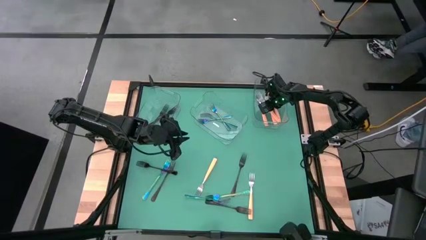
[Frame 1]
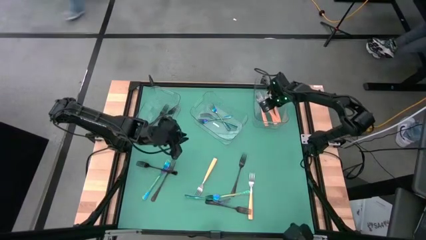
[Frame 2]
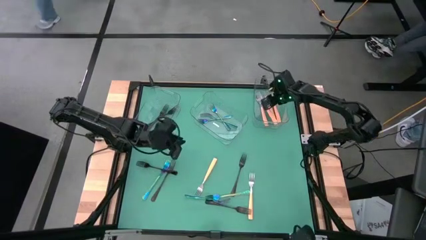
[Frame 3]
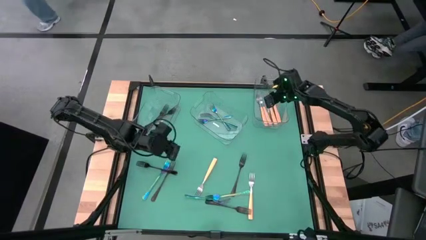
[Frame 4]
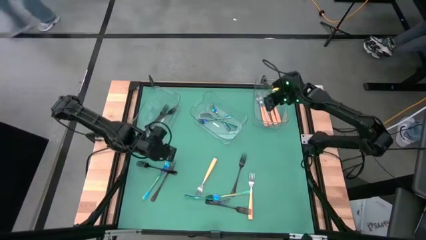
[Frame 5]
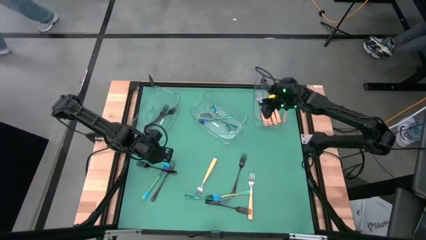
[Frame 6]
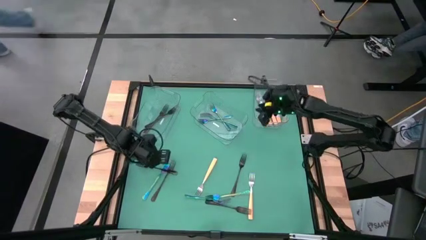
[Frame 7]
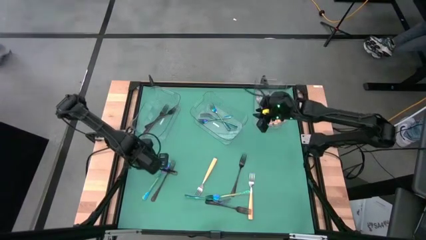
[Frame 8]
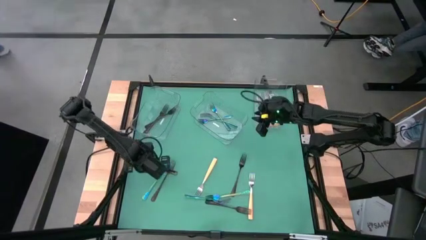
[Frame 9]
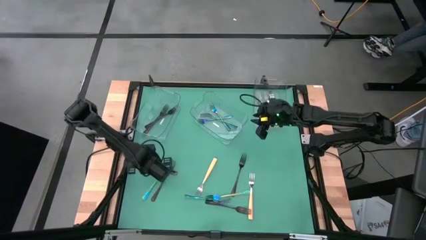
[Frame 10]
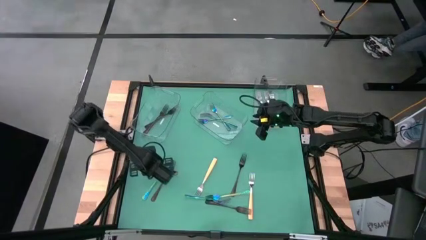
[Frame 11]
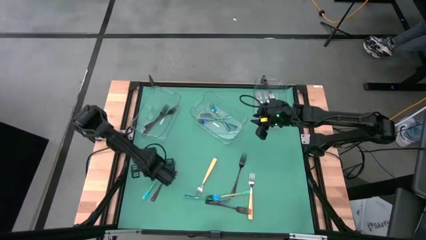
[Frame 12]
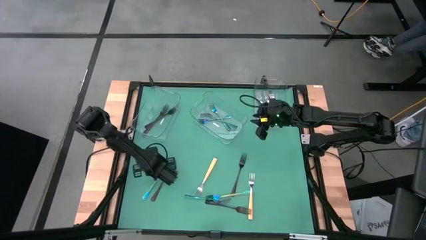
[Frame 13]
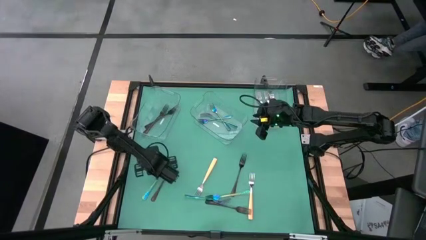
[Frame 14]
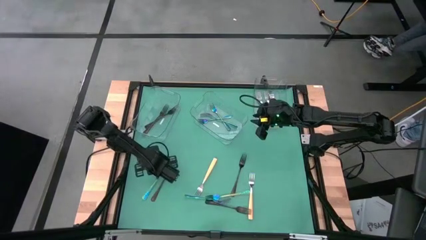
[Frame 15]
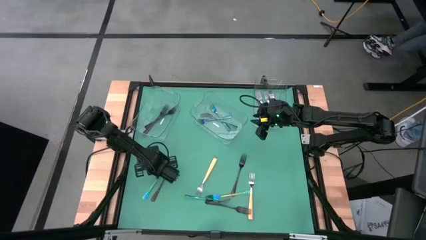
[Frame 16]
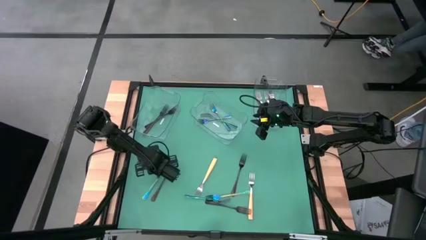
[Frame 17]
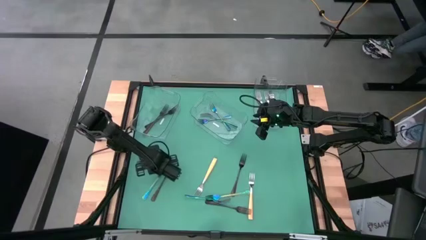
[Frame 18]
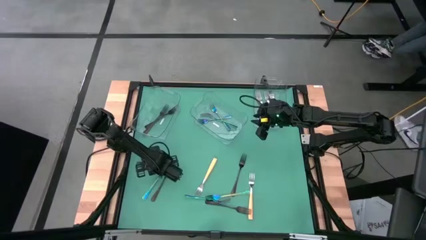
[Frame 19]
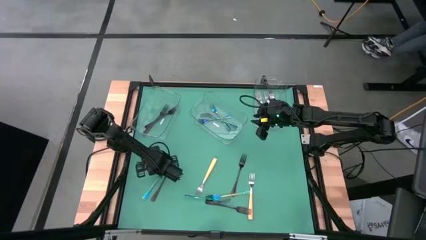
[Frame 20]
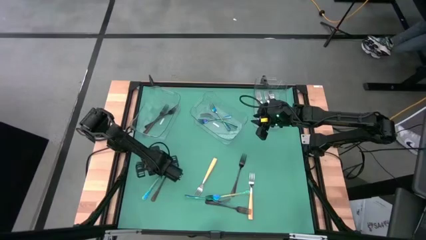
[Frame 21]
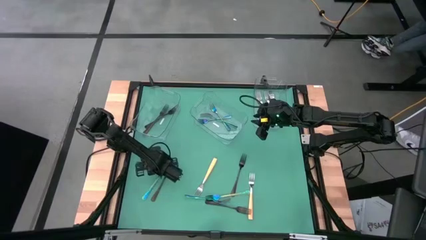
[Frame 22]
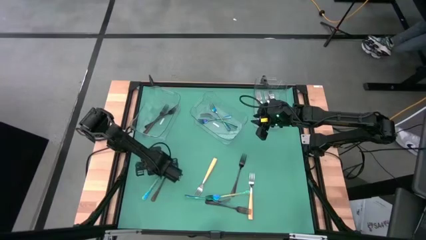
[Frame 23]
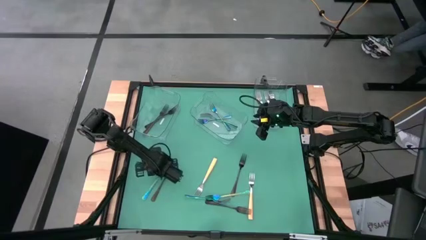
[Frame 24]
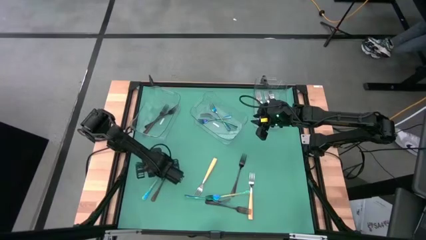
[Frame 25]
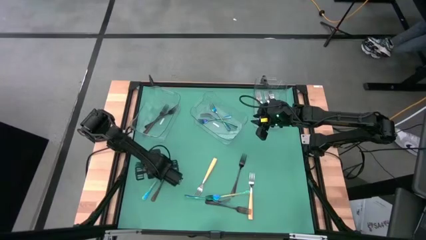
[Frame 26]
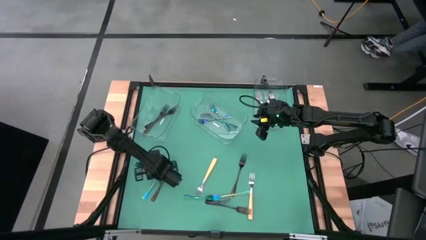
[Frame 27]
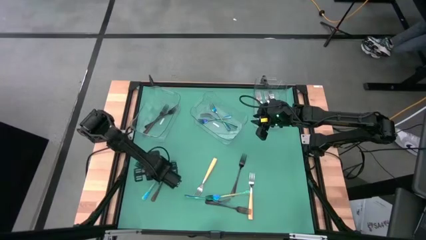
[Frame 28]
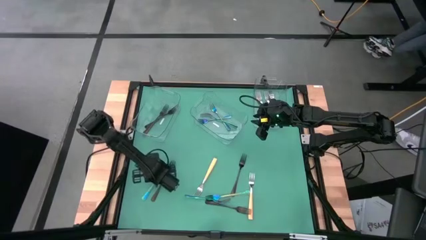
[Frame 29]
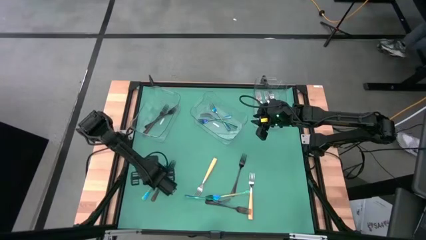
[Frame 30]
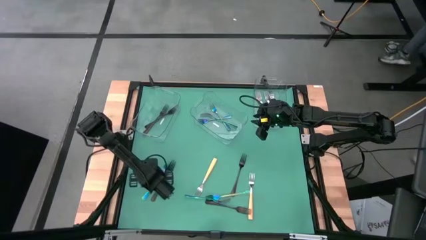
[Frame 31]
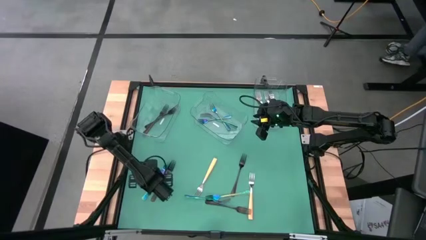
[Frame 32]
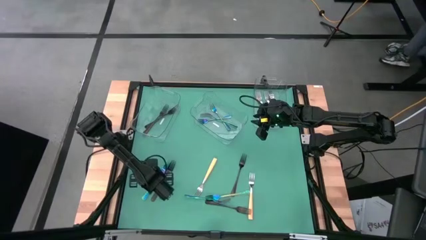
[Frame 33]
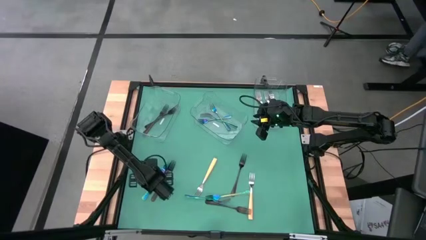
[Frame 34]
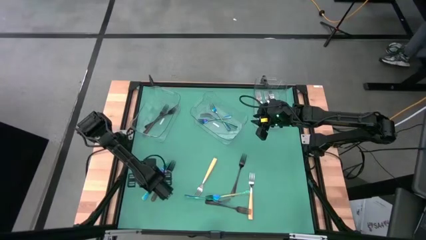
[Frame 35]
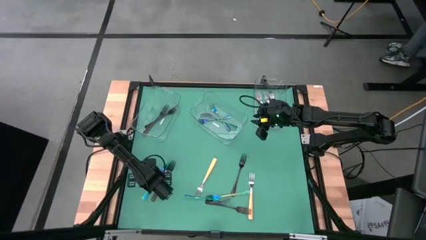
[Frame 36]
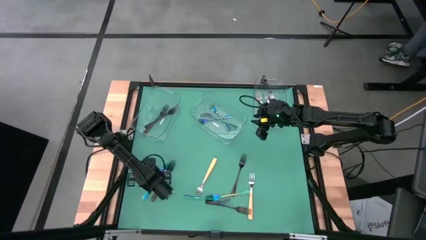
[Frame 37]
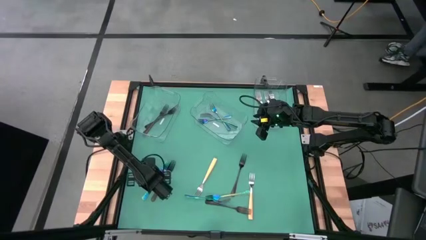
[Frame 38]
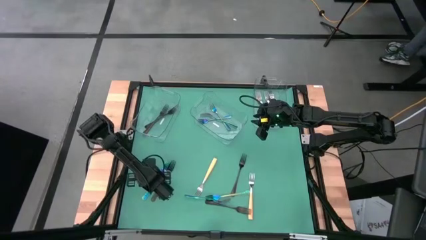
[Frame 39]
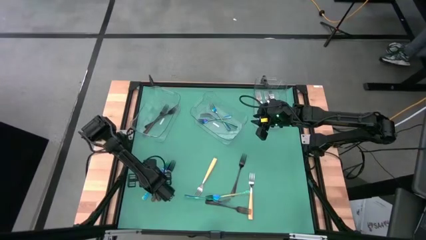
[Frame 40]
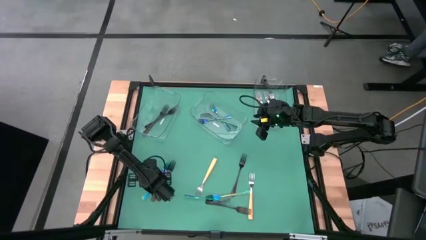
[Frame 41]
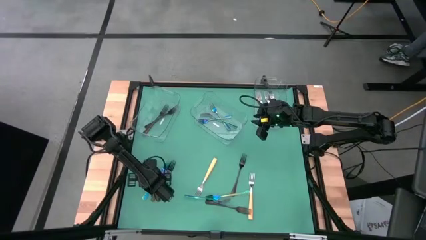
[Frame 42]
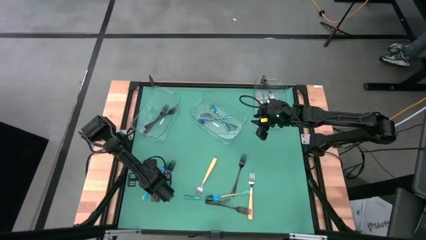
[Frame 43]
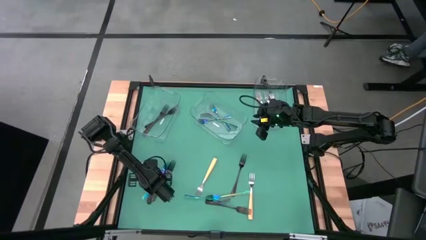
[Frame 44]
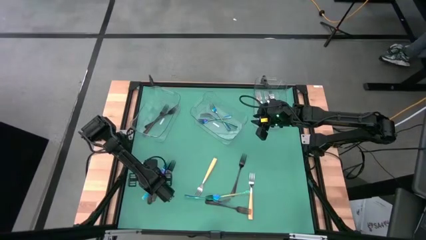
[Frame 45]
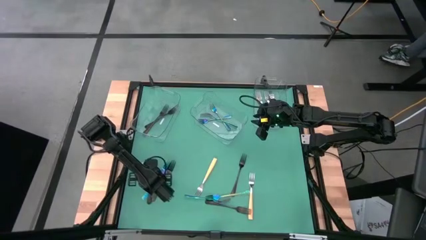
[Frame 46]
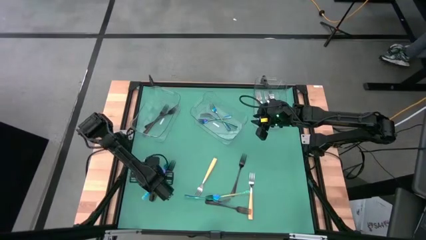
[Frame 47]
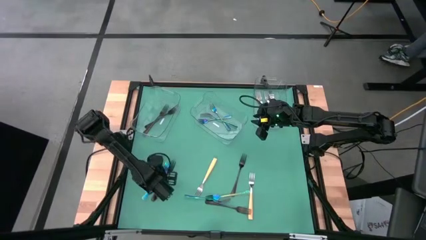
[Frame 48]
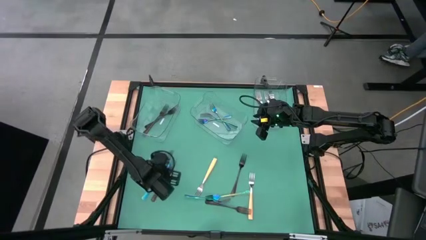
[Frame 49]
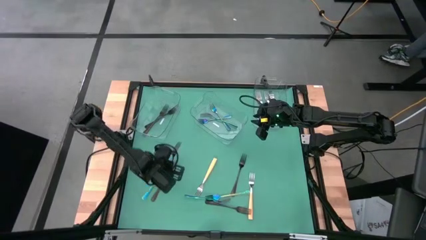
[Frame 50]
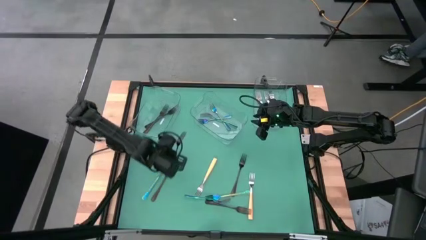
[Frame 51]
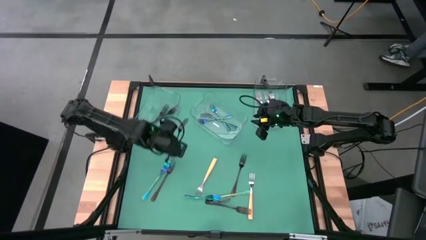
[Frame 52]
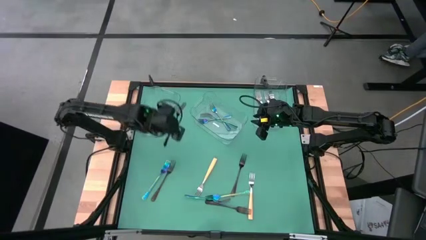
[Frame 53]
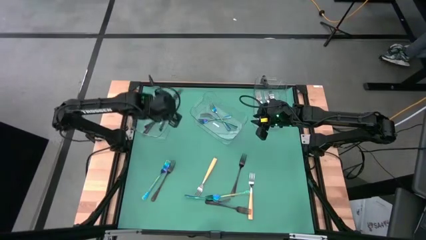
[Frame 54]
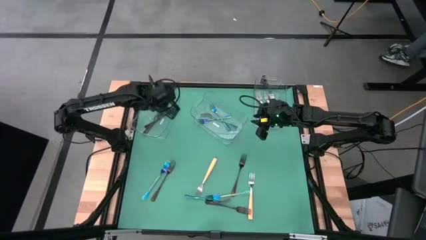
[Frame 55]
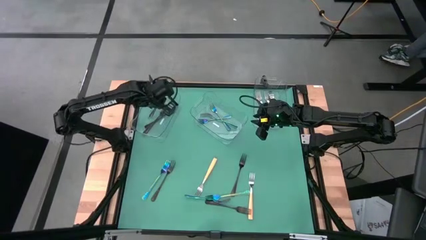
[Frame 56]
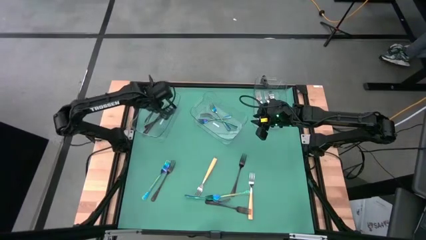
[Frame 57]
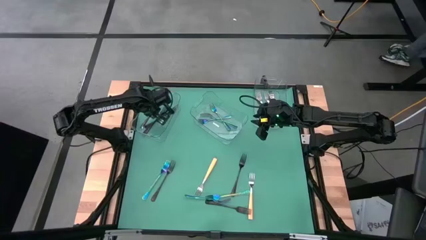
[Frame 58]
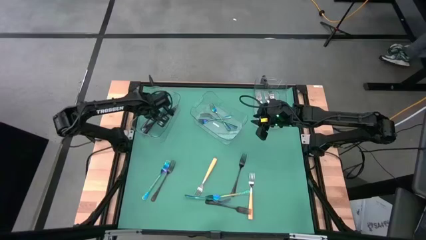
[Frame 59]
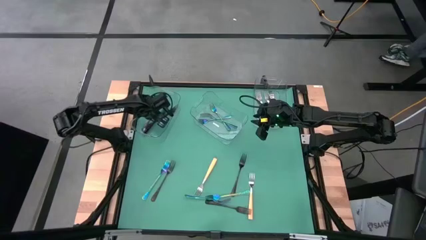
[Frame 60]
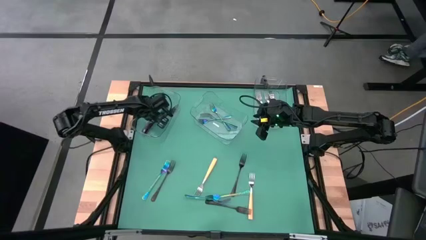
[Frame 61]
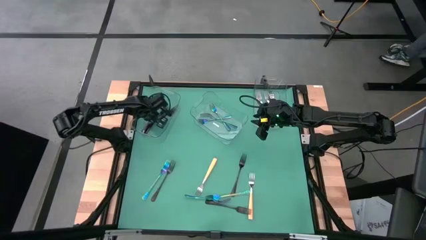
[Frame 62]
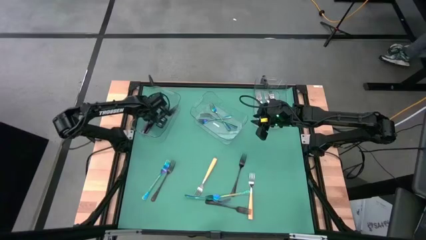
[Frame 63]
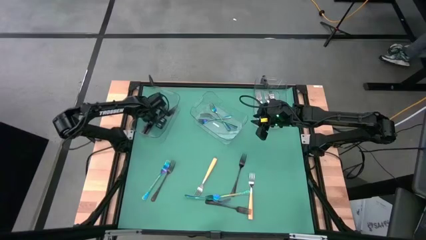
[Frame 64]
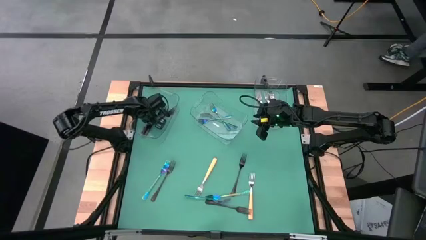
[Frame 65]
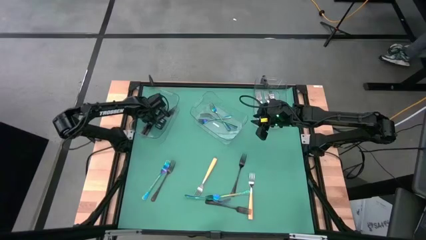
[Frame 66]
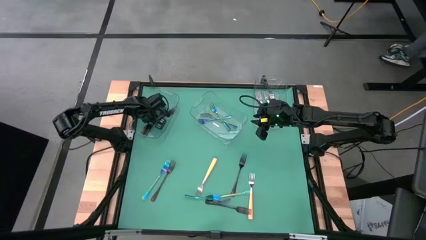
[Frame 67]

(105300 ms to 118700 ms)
Task: Sort silverware by color (type)
Put the black fork into the left transparent bin

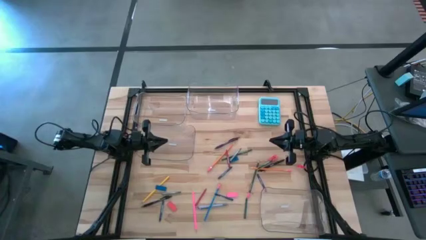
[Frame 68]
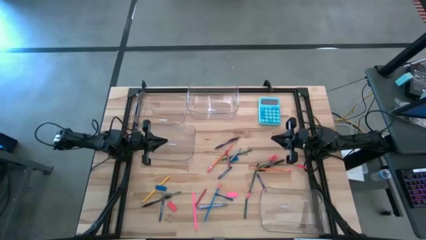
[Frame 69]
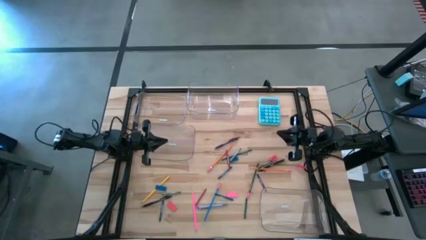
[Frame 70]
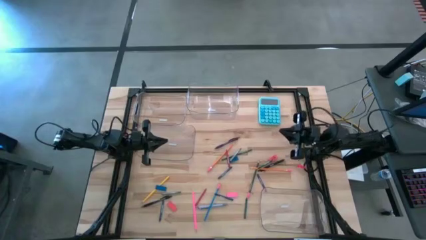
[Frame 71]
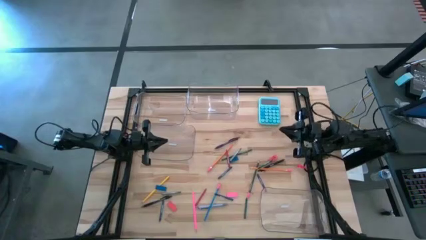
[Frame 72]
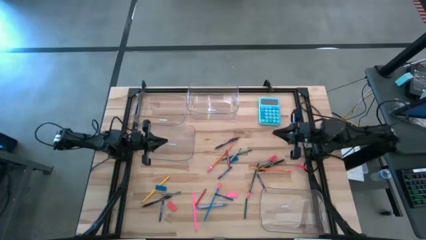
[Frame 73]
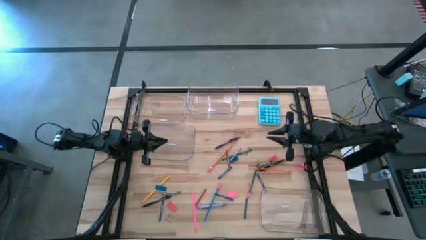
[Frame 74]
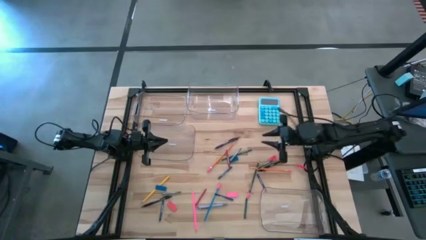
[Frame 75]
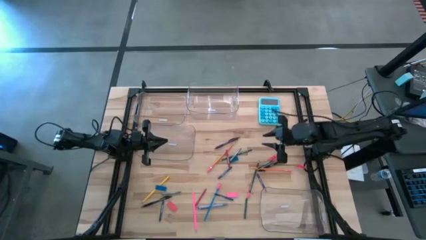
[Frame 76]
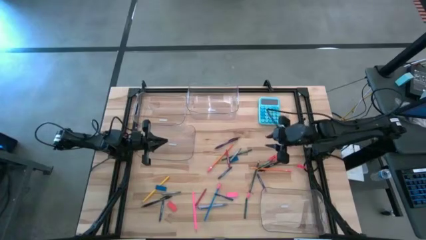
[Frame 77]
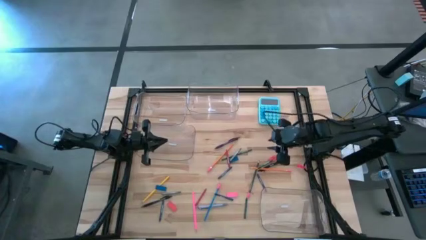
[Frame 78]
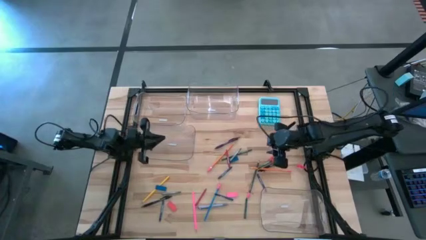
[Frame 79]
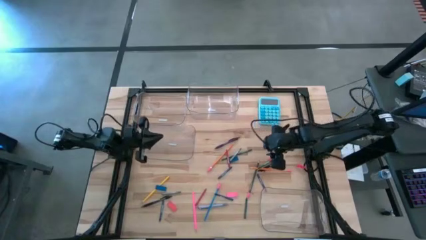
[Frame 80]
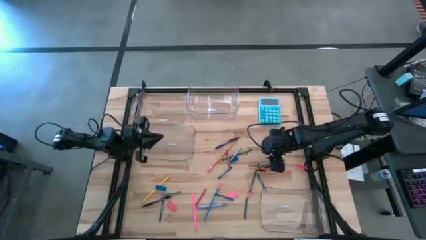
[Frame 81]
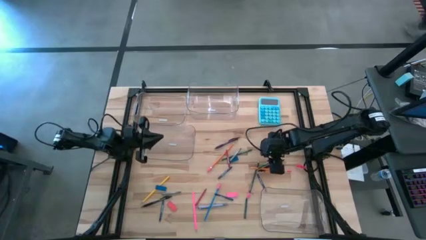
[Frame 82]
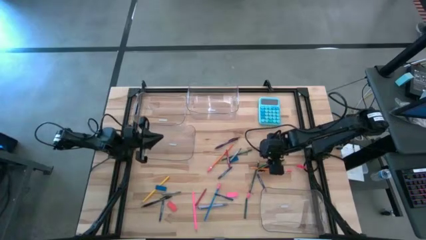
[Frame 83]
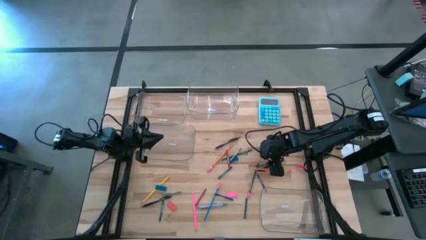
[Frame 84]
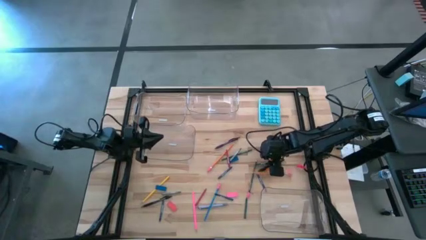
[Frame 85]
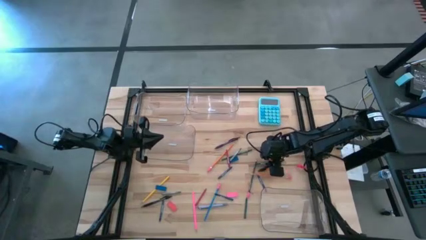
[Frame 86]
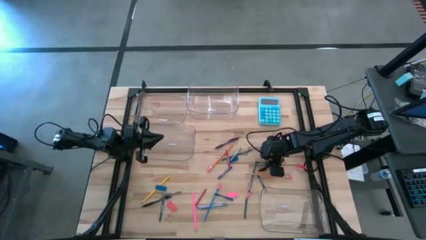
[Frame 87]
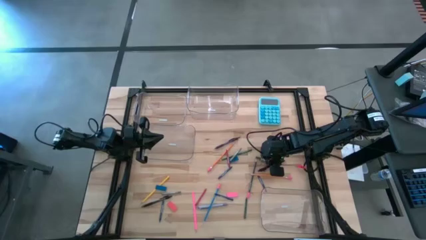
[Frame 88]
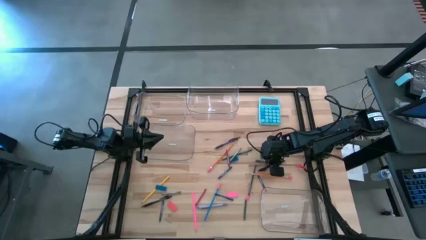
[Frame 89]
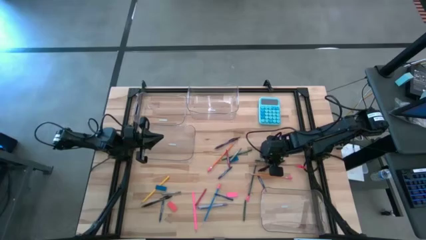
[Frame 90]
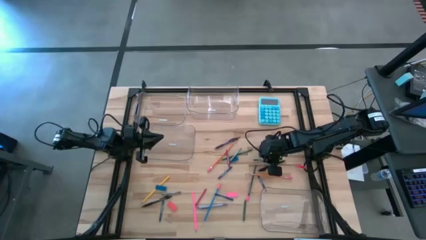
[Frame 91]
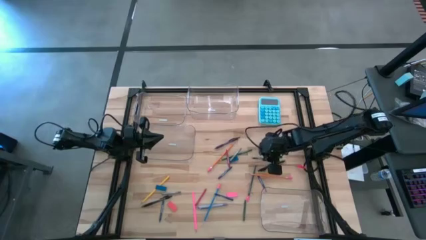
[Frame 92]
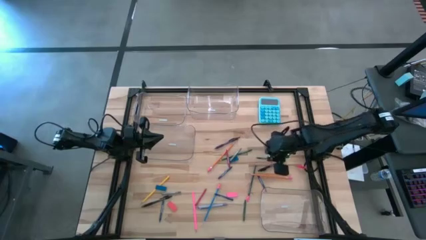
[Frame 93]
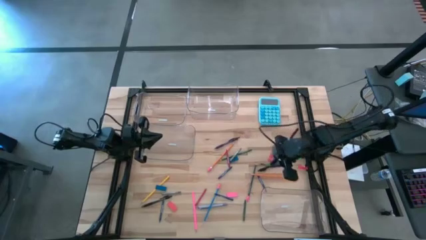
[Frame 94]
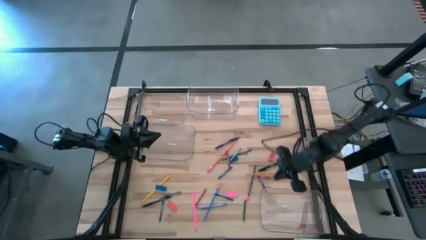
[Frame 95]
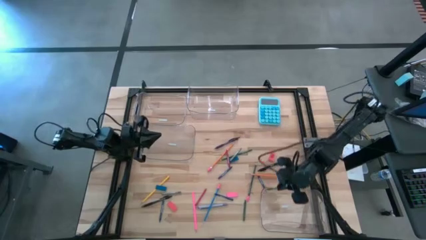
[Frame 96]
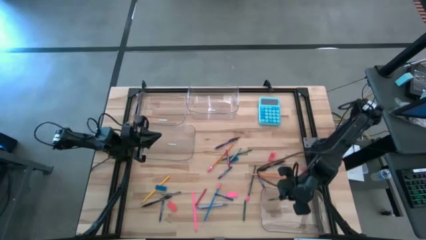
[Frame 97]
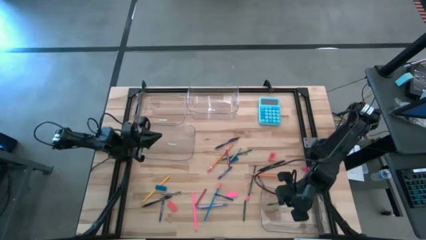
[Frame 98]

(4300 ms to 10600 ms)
Task: Sort crayons/erasers/pens/pencils in bins
Put the green crayon into the bottom right transparent bin
